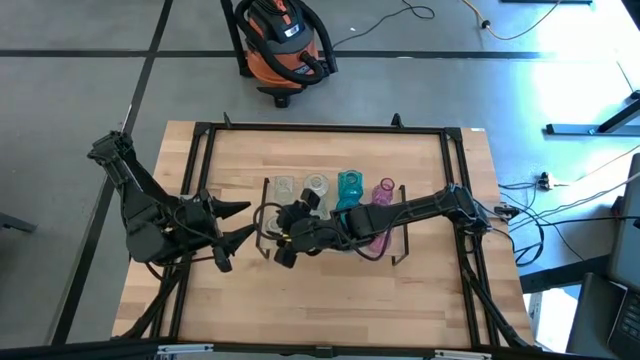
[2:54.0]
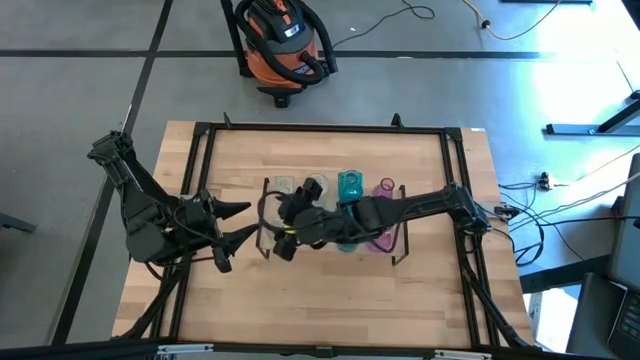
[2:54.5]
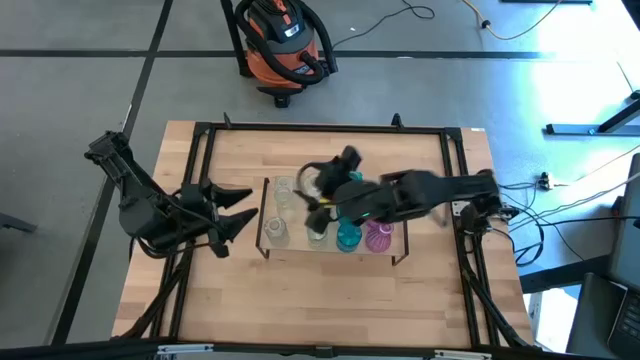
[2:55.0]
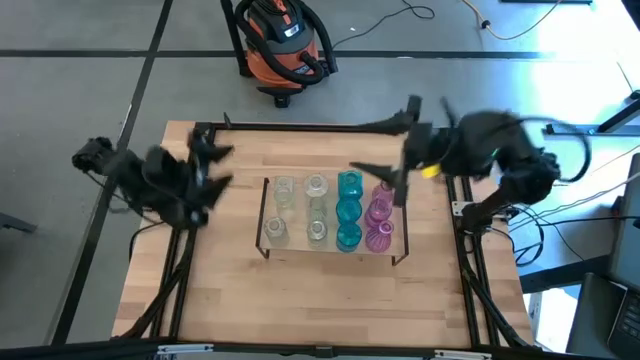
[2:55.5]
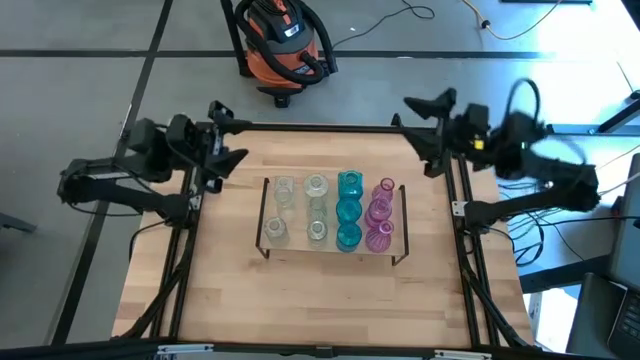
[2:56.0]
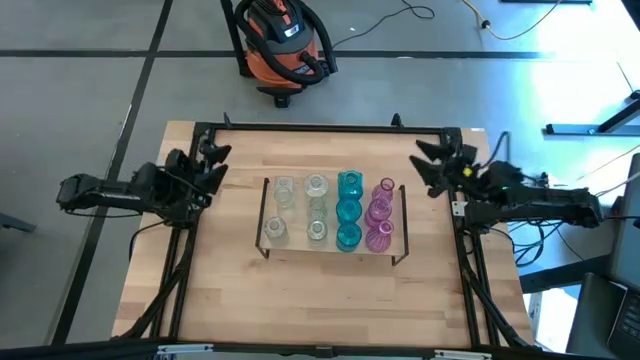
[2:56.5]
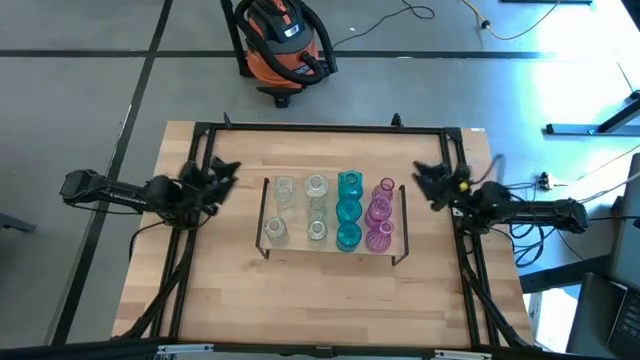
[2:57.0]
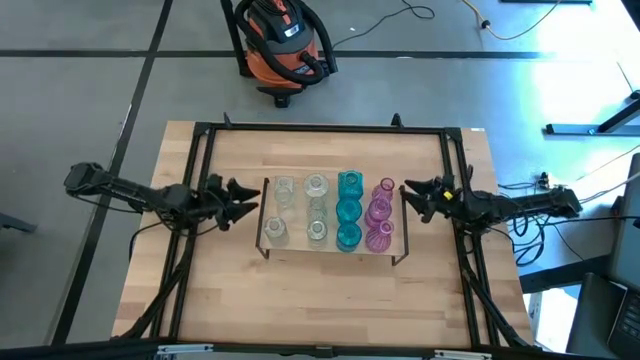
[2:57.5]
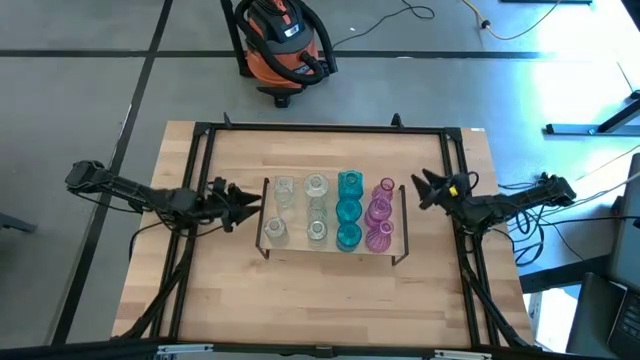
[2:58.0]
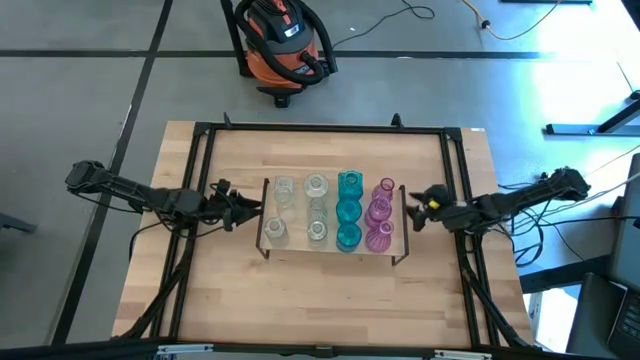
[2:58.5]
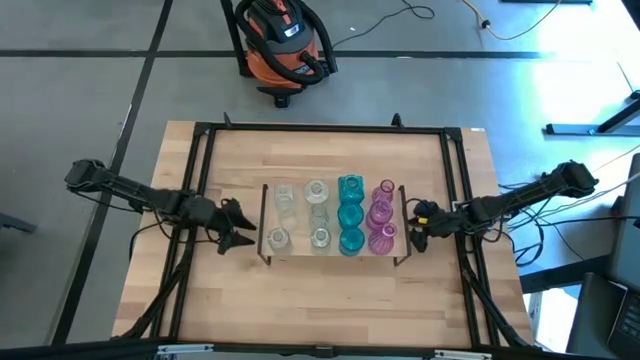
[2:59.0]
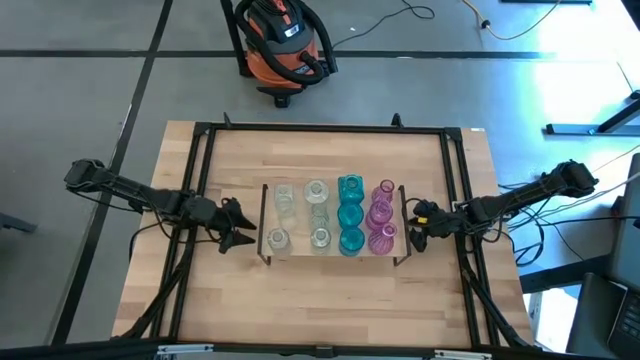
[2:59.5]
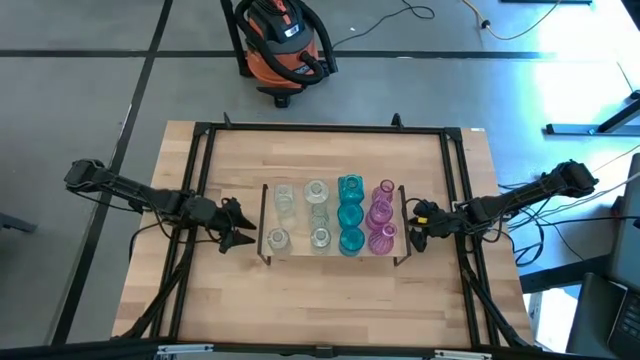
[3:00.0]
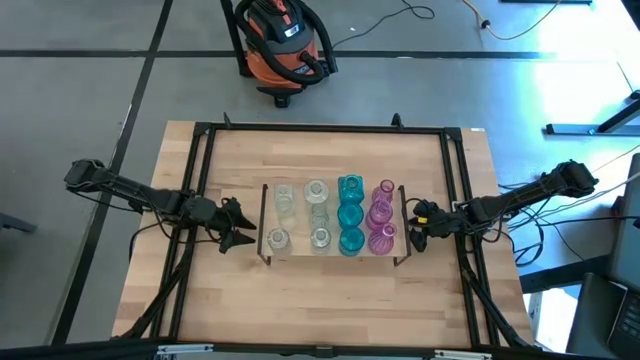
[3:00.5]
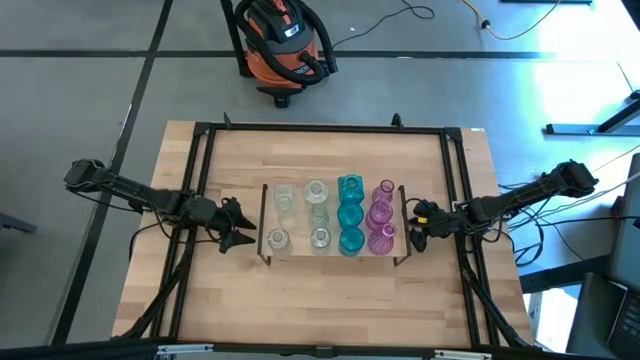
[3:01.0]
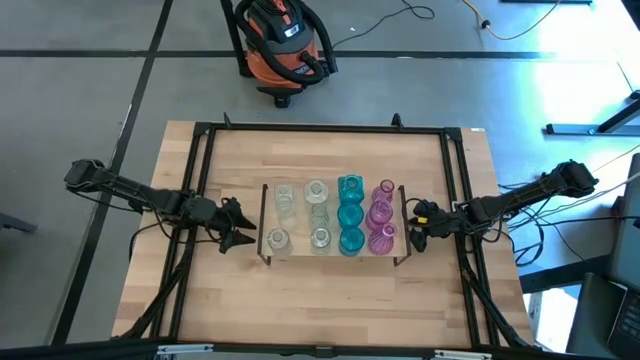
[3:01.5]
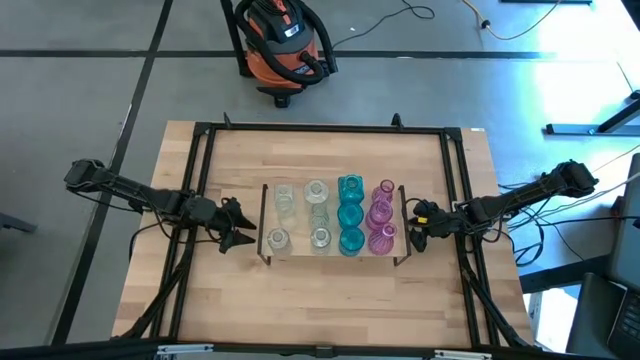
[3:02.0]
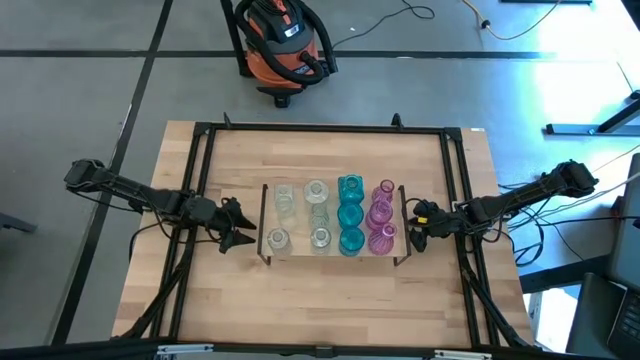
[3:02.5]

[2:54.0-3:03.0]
Task: sort vases onto shelf
Return to Home Position

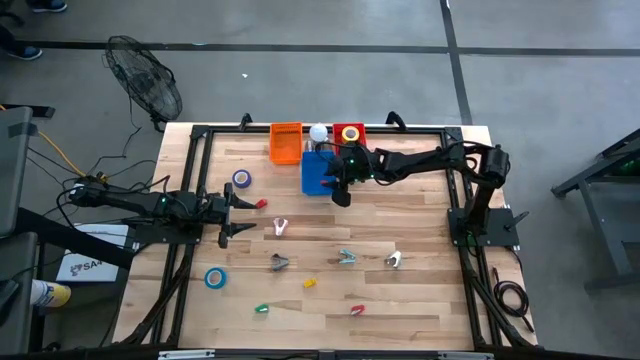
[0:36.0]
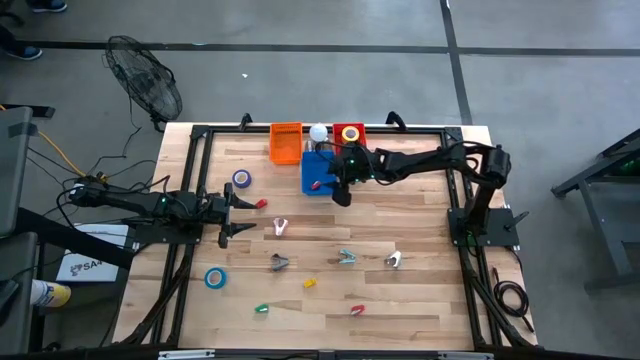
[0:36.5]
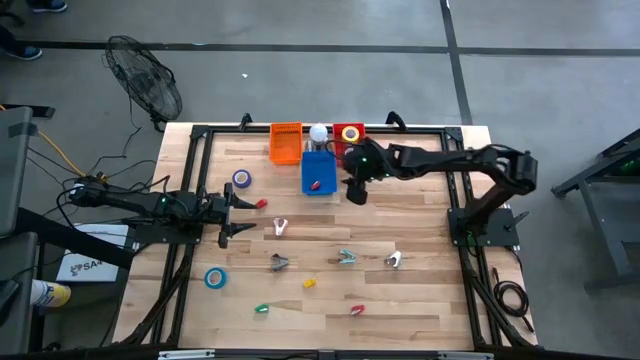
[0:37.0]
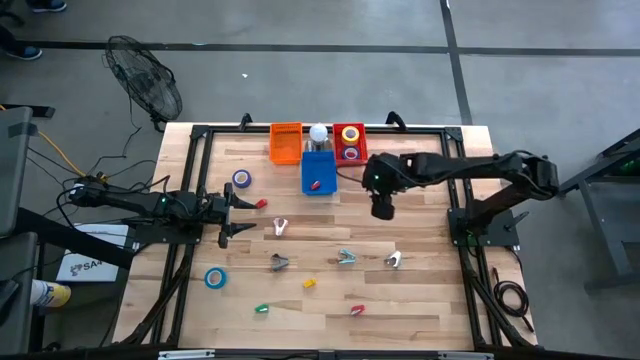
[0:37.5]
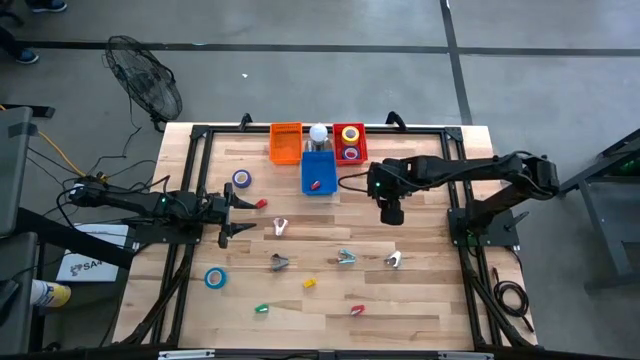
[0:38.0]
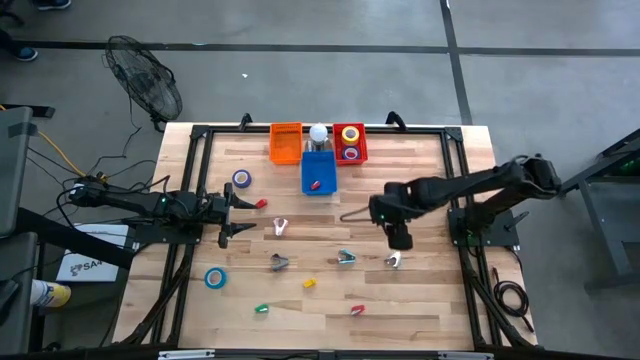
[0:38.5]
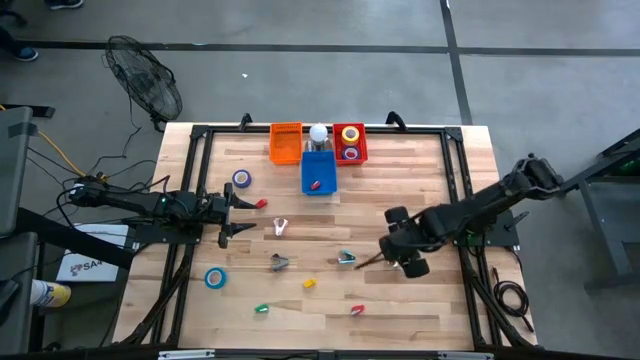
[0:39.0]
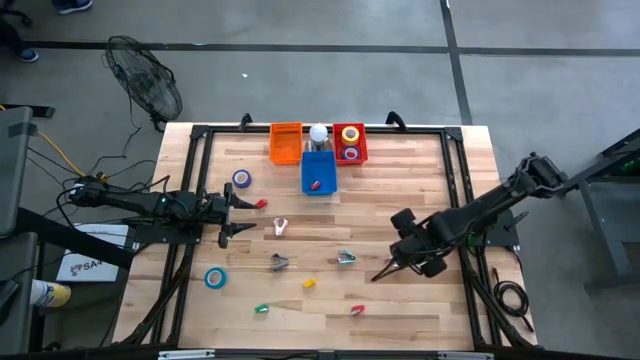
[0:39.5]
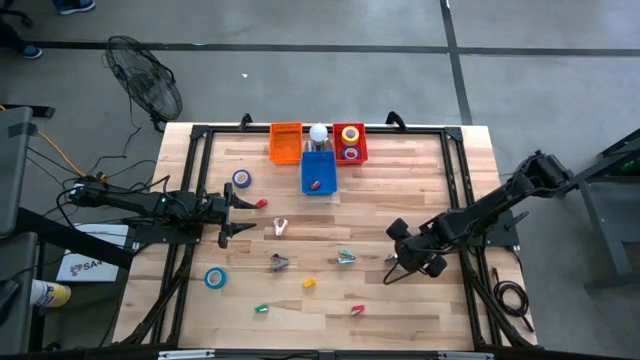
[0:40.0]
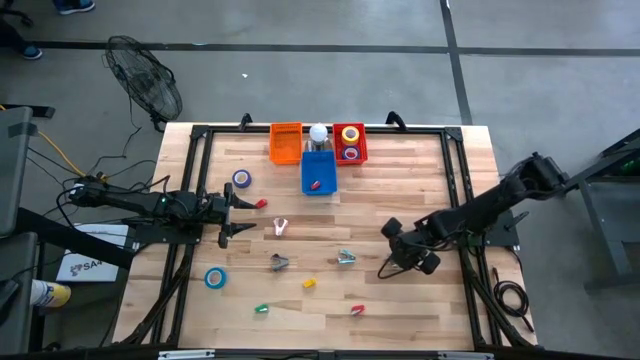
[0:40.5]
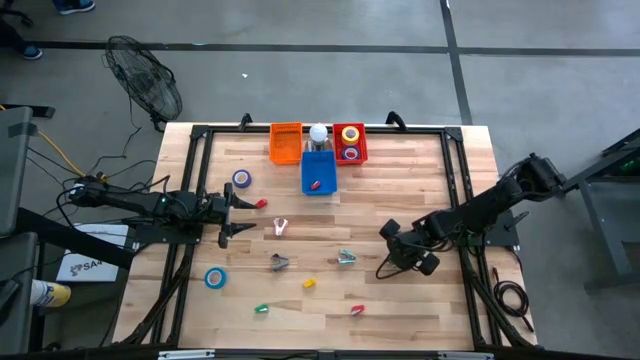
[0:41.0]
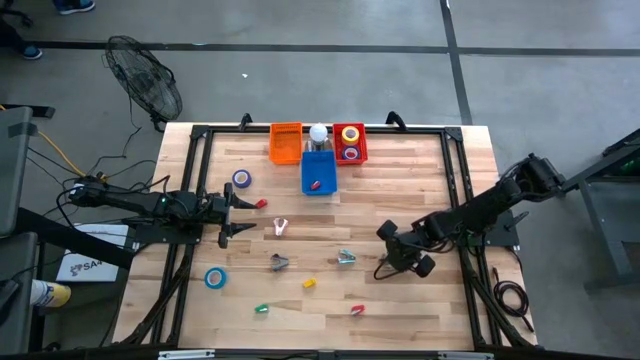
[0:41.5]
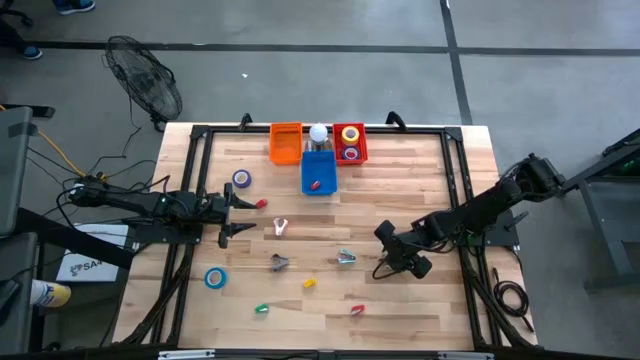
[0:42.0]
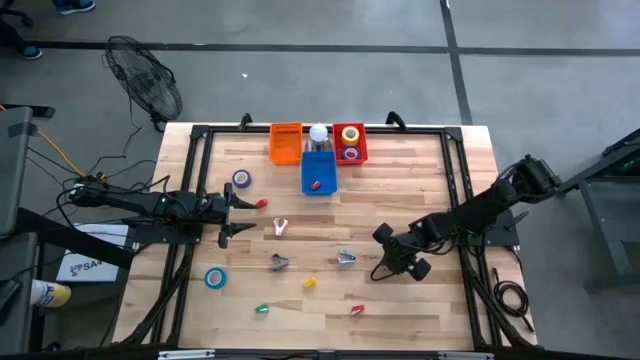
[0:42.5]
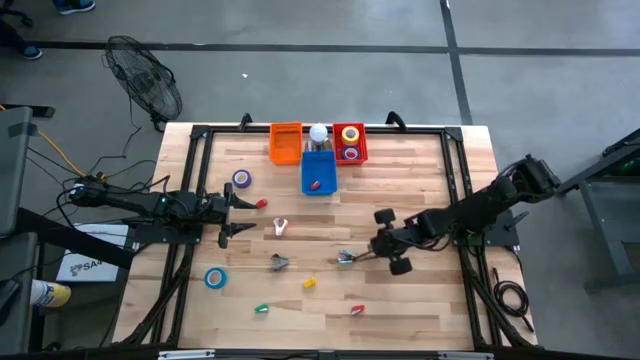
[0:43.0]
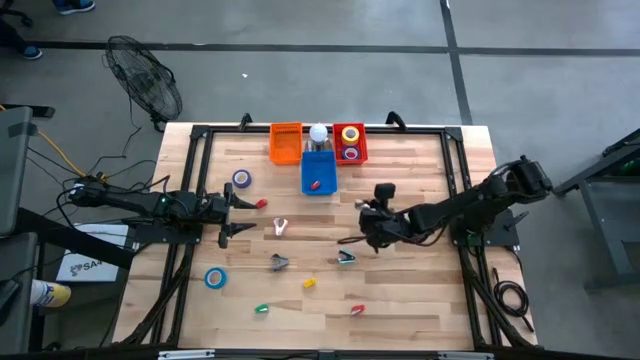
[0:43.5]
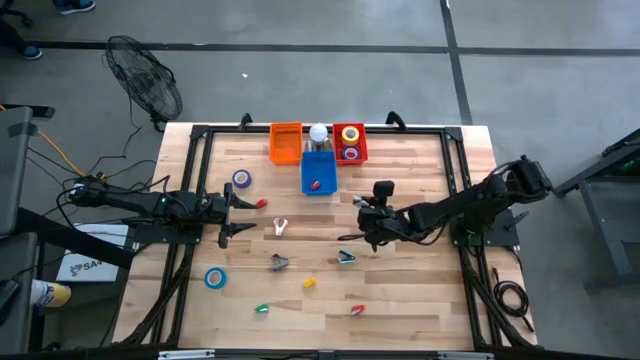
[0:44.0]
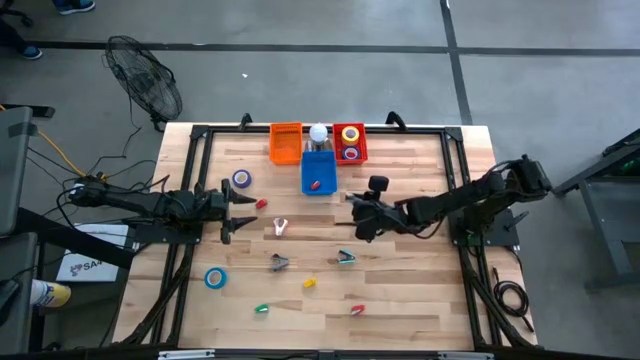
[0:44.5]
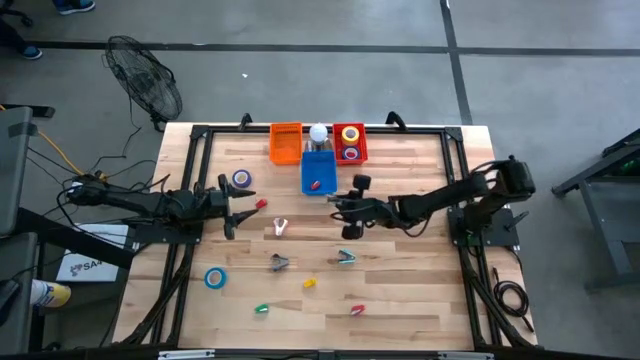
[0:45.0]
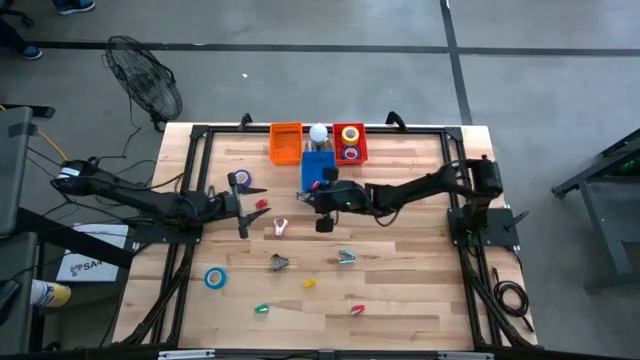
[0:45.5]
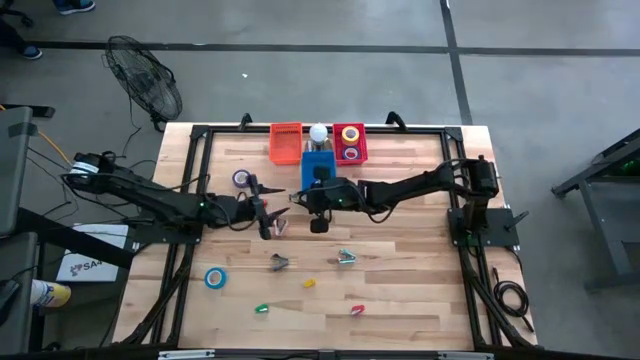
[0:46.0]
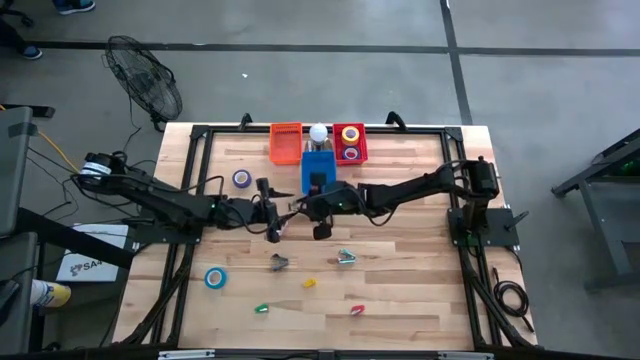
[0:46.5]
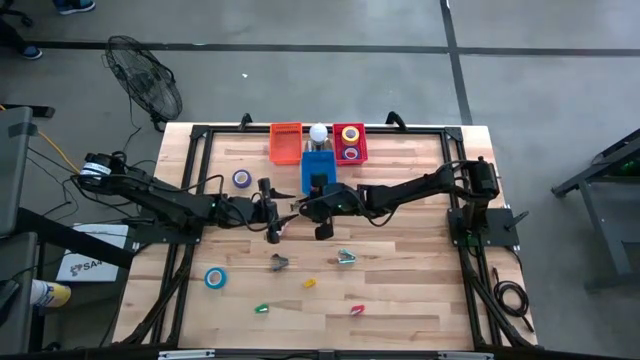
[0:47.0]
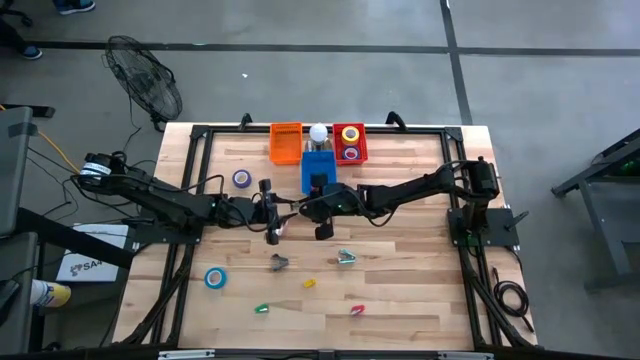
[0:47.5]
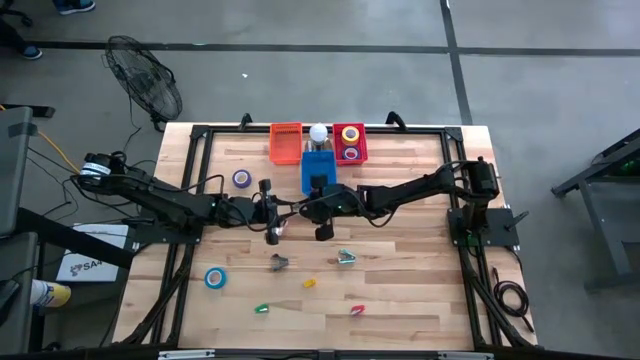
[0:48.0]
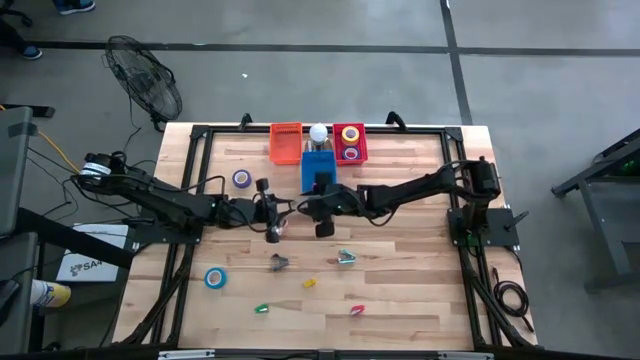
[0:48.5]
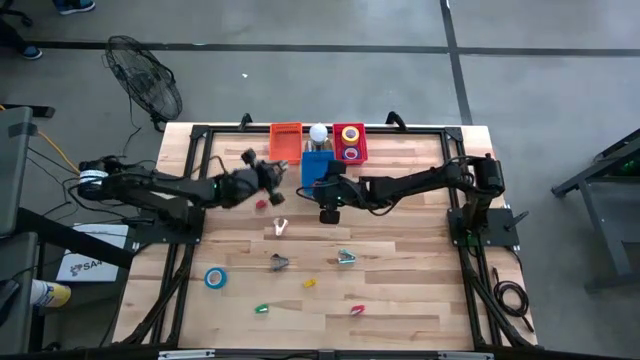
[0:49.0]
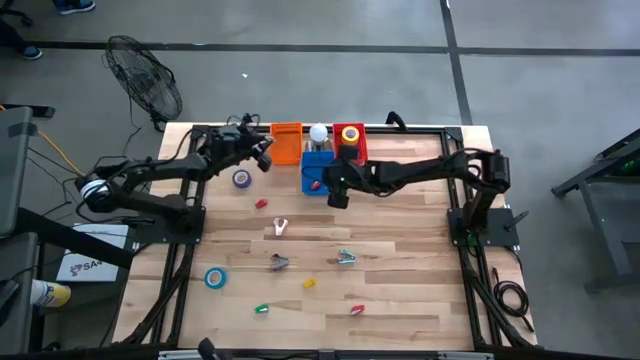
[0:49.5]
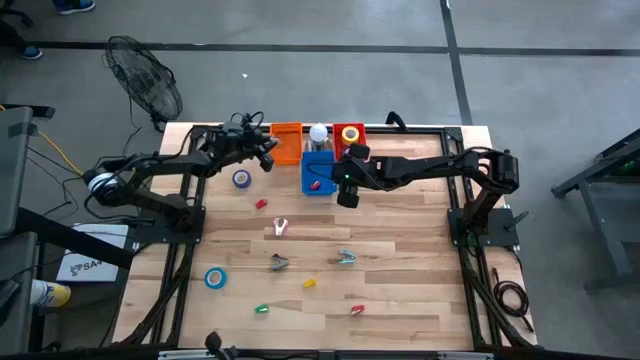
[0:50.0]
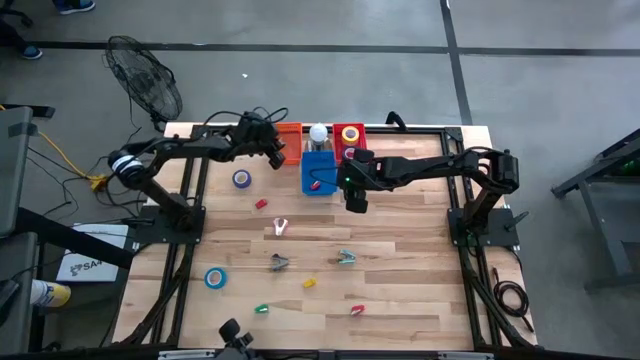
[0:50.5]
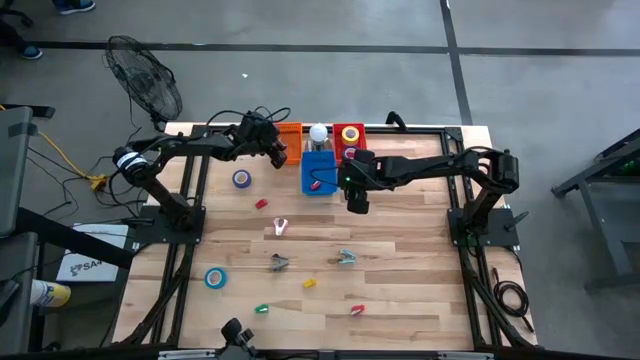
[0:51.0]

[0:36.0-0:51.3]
Task: Pick and place Stapler, Stapler remover, tape
Put the gray staple remover into the orange basket
